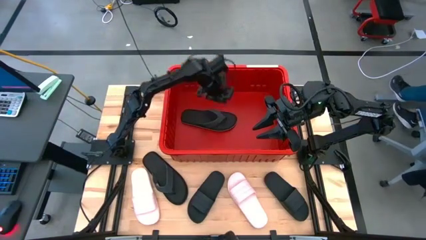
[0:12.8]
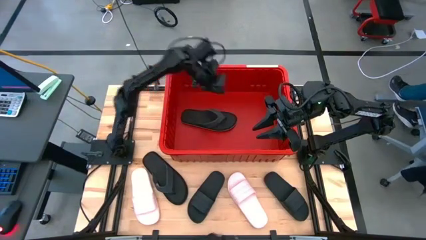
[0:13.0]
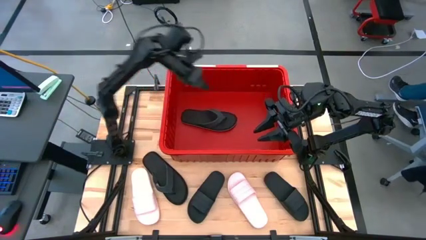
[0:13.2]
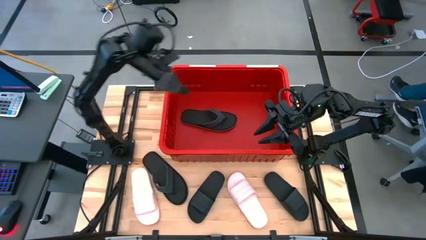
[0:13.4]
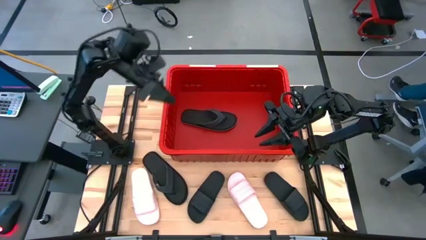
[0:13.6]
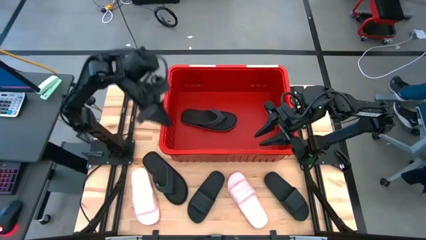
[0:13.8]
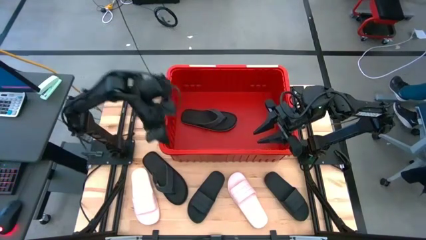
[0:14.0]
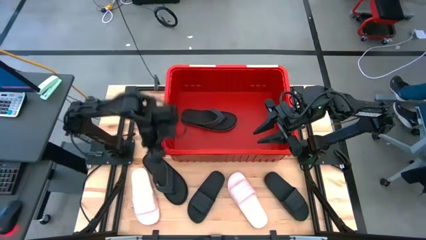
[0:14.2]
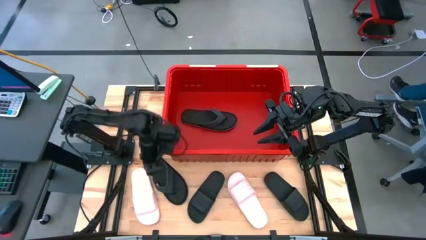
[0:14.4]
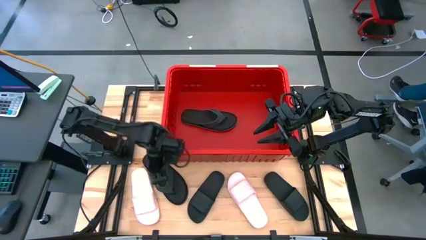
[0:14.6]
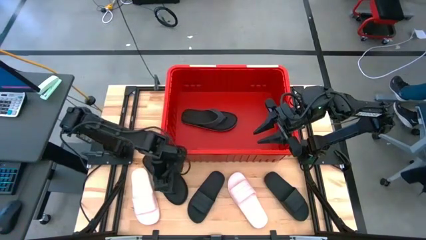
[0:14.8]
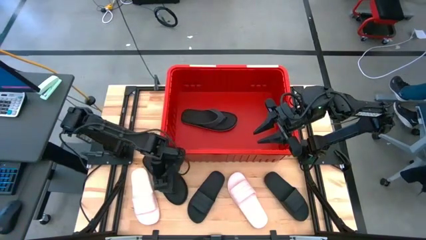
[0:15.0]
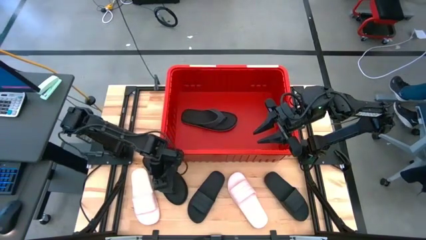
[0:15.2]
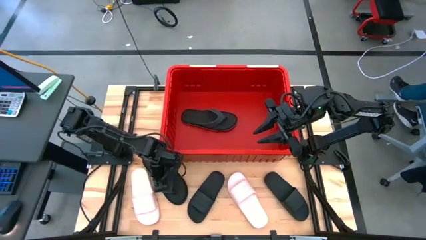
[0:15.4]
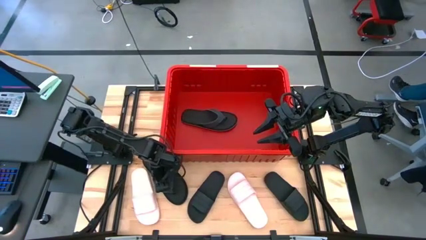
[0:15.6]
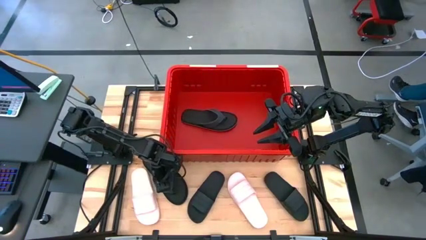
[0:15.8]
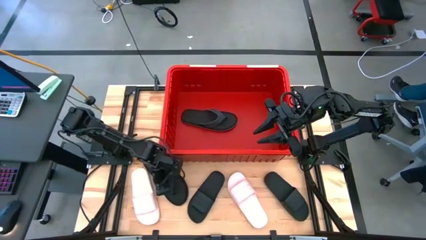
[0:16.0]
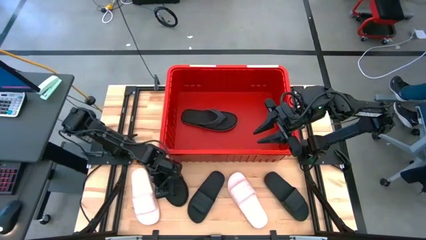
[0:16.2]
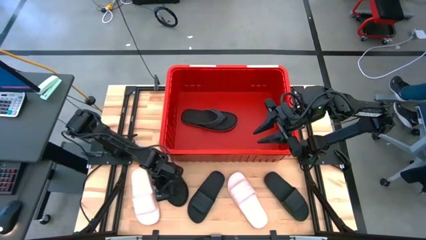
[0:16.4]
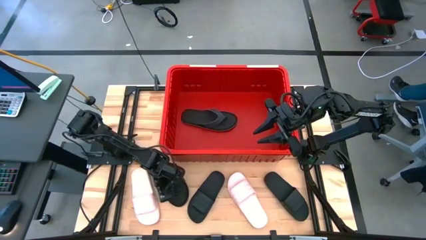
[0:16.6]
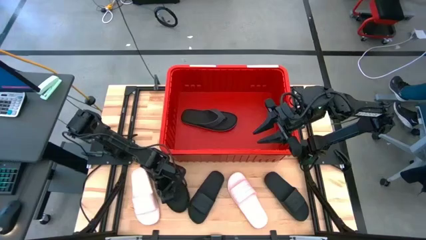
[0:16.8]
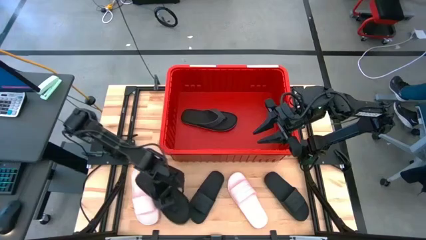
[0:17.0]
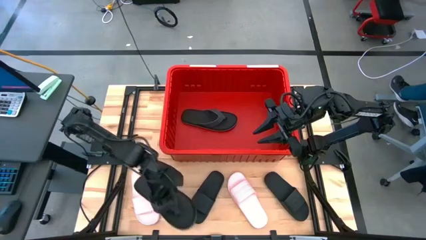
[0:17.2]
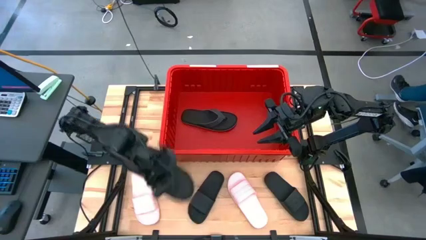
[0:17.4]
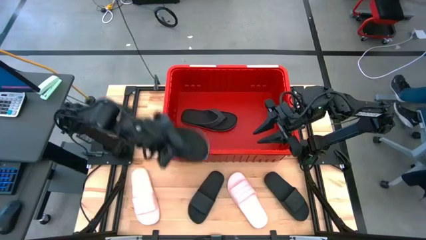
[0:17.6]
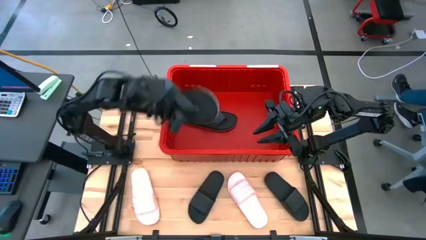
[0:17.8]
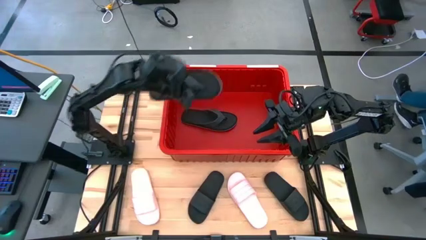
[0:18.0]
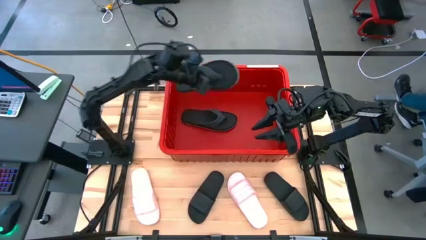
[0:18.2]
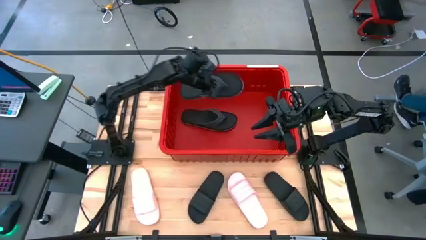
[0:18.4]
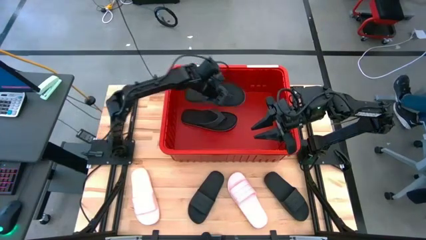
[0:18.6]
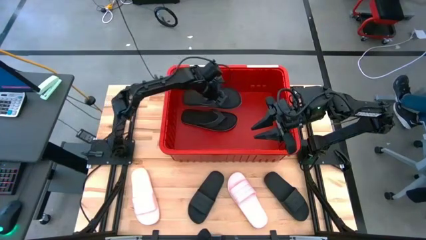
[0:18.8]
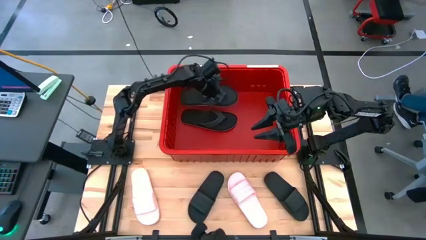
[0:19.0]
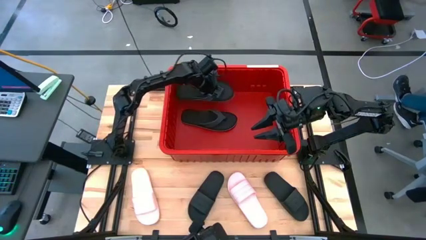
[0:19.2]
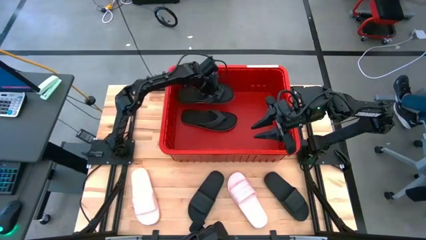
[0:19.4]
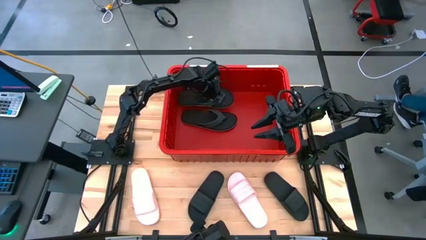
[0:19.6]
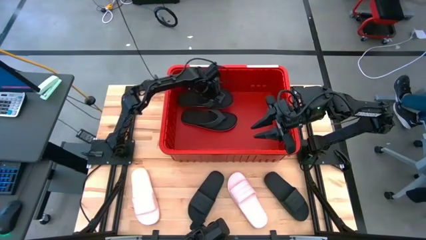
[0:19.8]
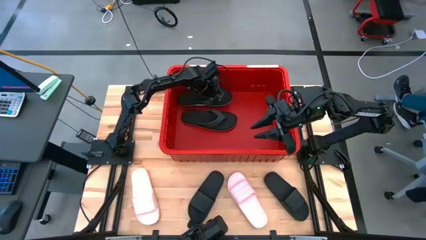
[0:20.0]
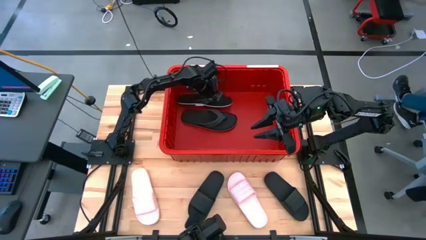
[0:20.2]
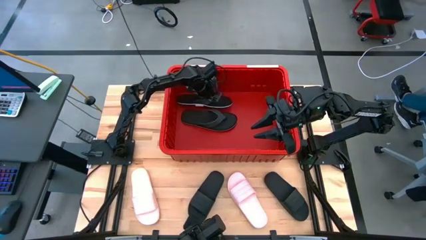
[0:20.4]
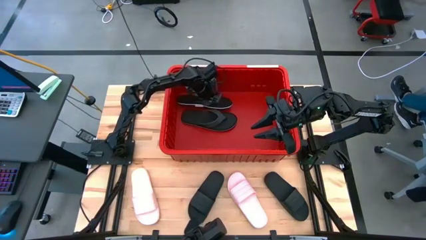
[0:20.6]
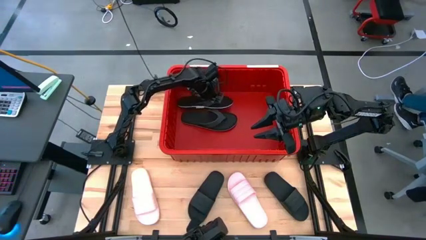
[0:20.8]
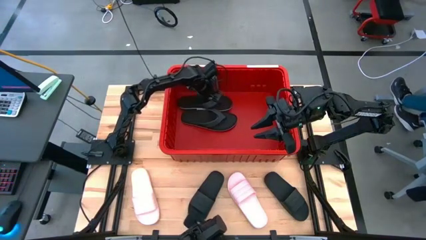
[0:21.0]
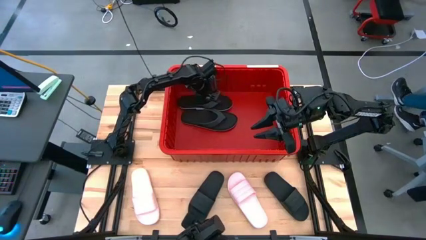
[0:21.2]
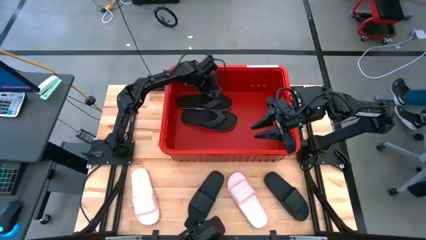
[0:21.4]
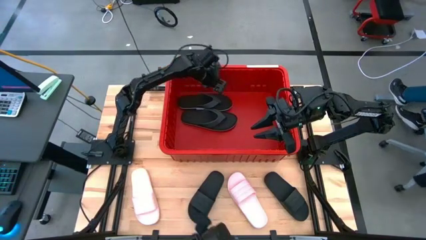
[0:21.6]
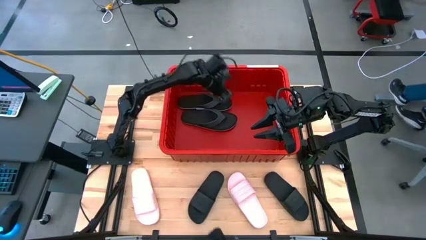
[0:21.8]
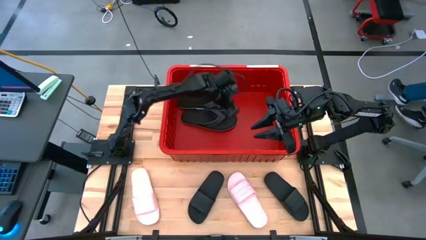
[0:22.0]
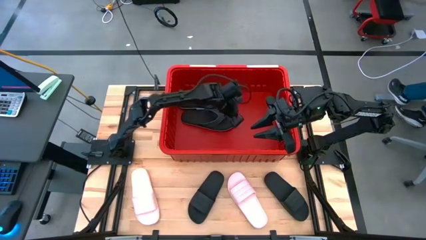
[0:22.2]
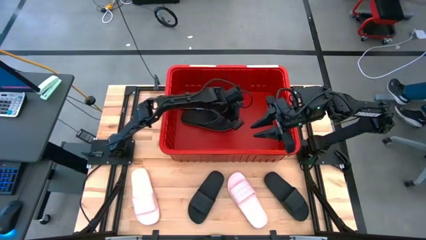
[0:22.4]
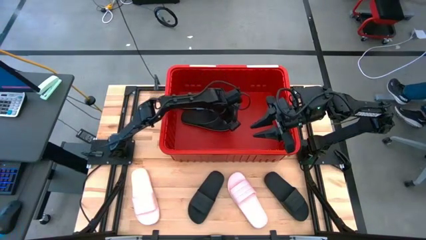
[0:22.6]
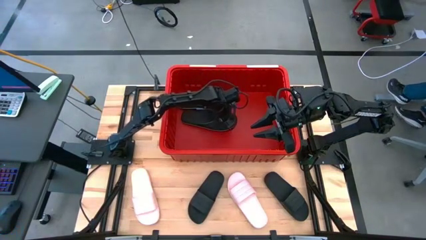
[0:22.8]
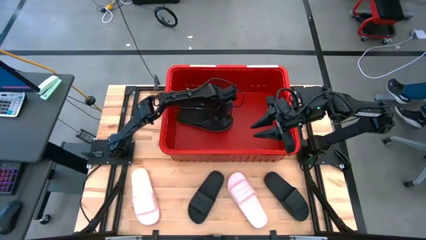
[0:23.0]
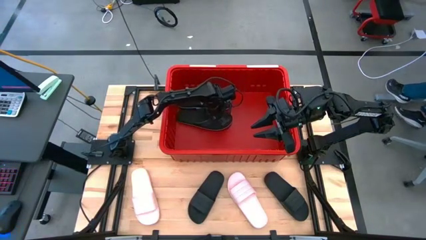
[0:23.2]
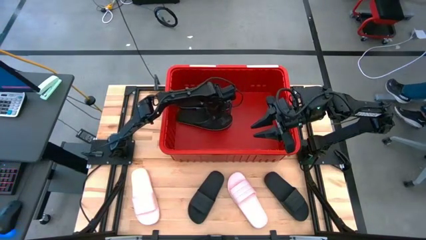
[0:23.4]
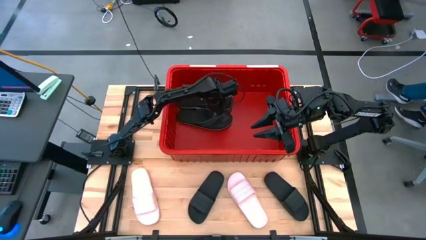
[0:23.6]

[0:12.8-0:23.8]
Task: Pick and place slides into bin
Put the other black pair slippers into the red bin

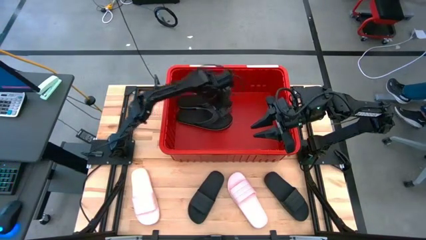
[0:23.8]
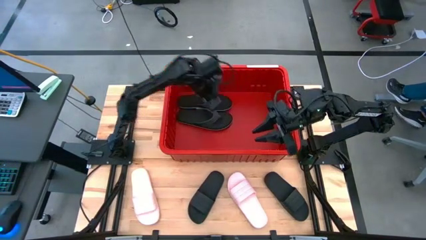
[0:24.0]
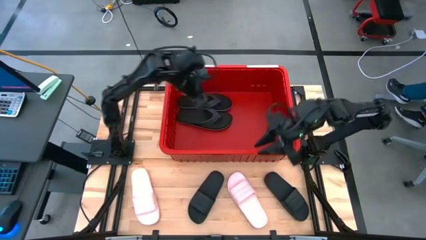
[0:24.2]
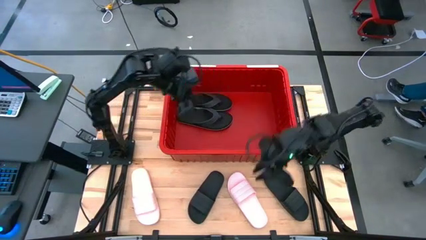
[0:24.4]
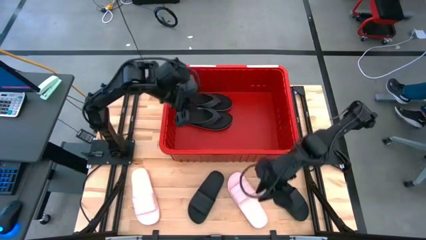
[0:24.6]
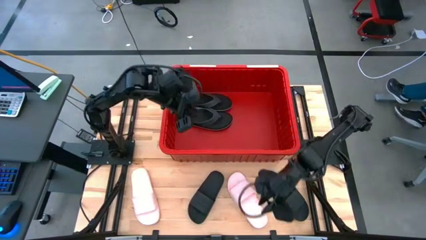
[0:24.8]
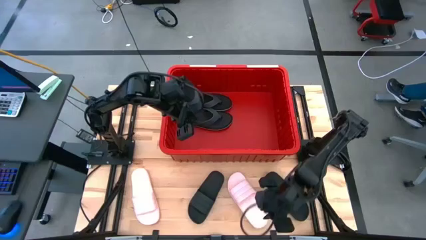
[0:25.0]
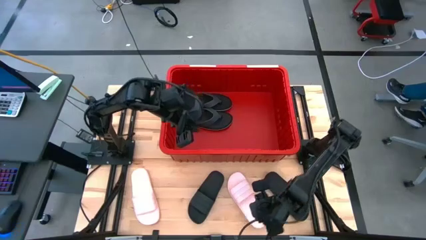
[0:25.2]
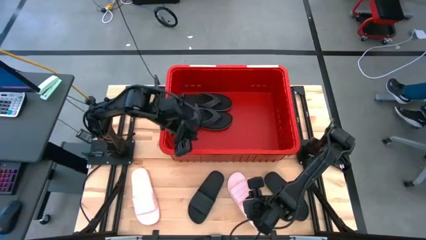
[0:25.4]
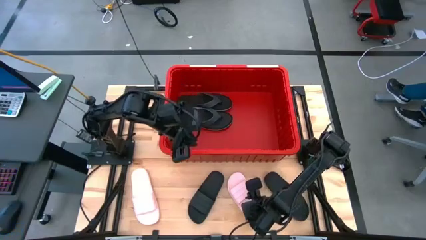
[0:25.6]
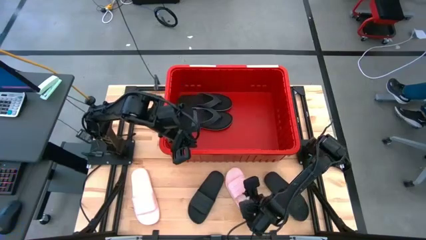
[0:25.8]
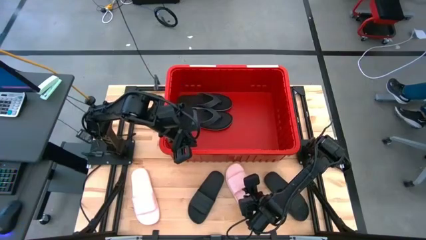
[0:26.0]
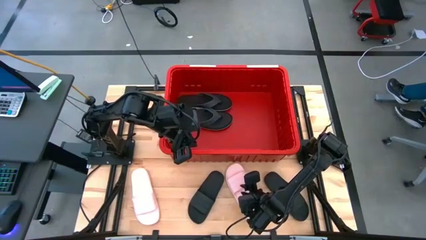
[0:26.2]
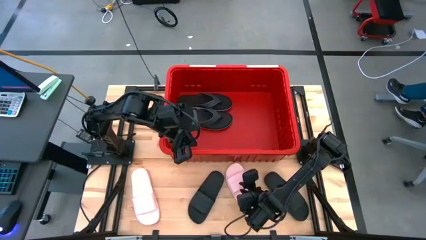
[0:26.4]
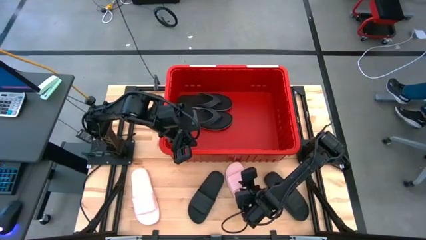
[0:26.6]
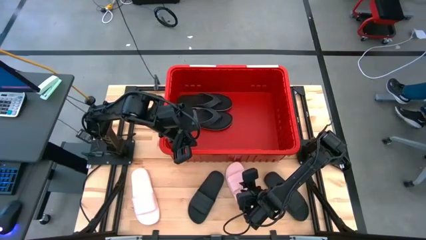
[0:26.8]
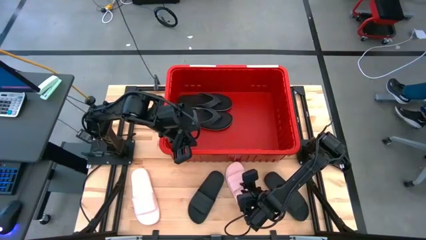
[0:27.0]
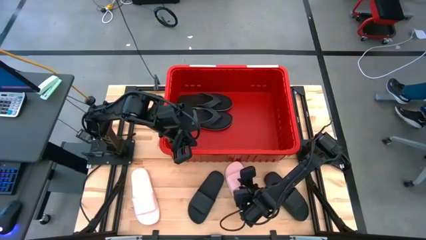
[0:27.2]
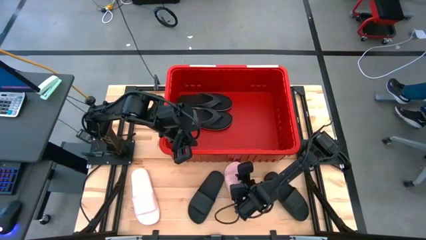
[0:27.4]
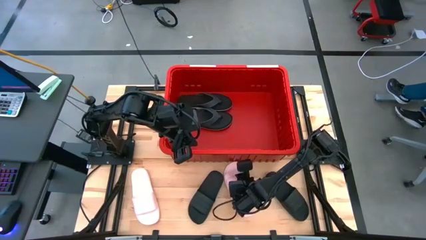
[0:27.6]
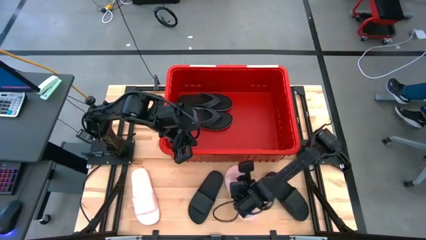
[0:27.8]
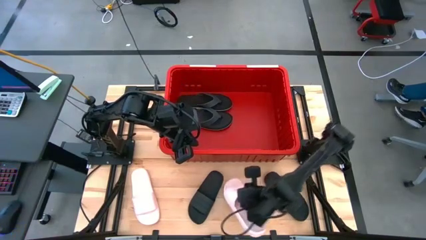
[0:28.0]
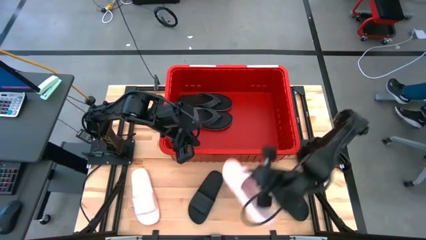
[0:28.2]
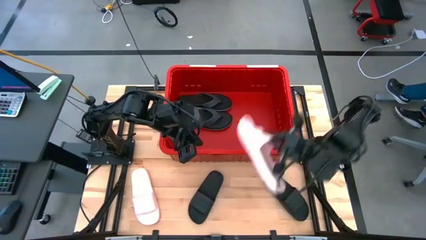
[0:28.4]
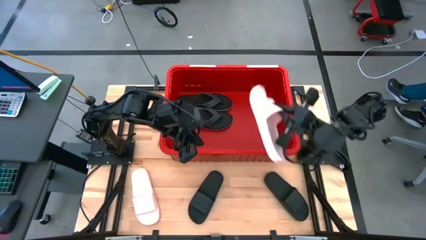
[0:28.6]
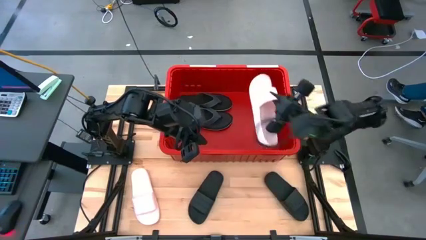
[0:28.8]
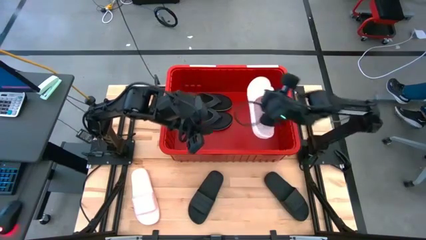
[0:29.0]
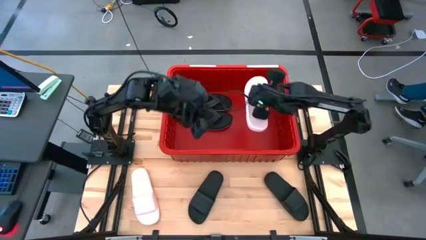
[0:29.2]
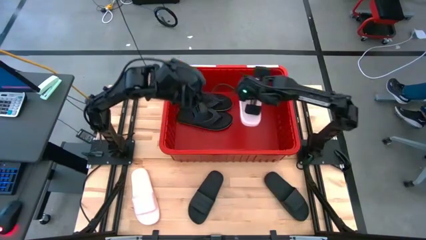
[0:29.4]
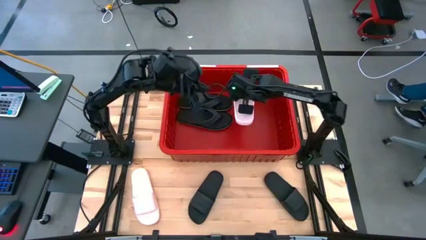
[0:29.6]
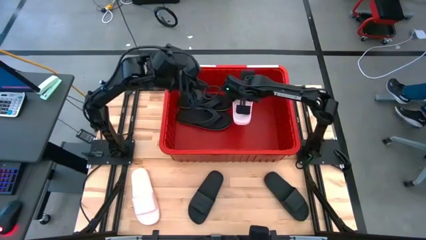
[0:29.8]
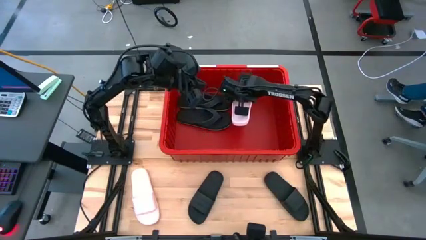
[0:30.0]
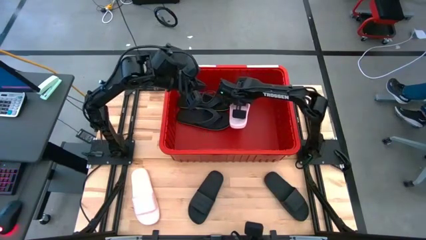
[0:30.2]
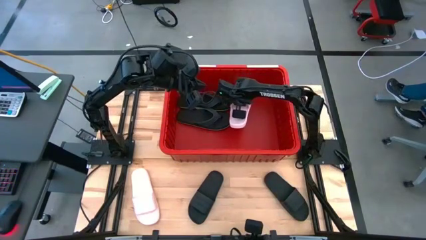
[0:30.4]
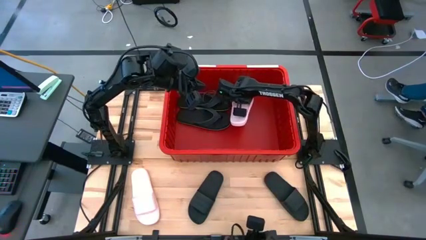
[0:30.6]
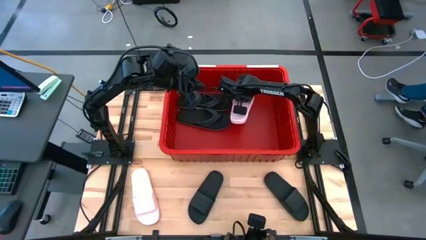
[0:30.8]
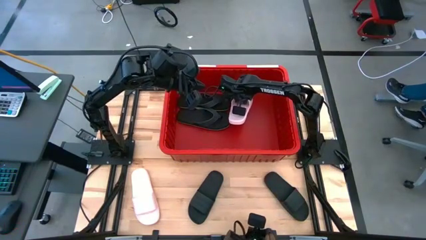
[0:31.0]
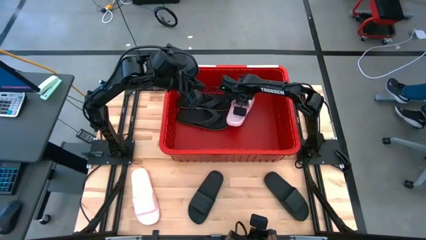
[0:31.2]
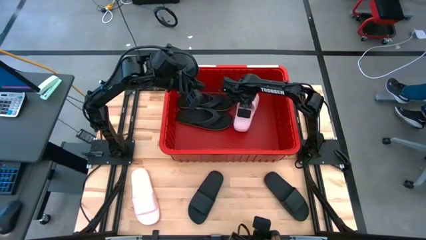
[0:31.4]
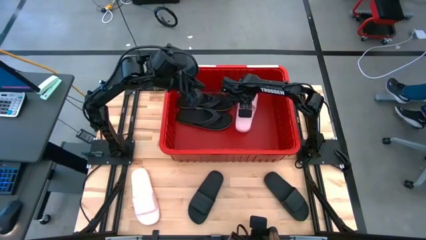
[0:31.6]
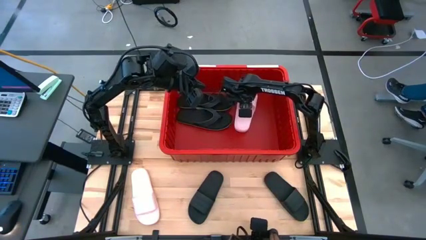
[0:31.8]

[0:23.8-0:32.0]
Put the pink slides into the red bin
